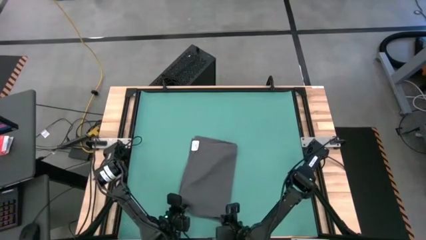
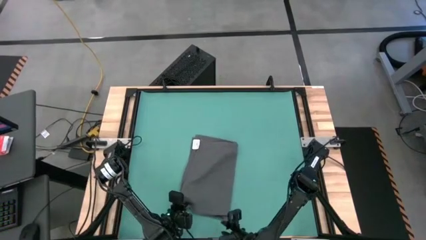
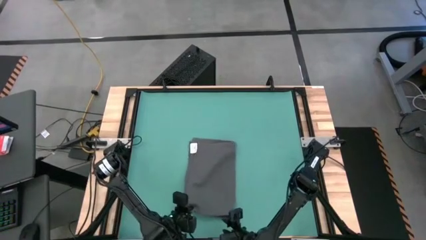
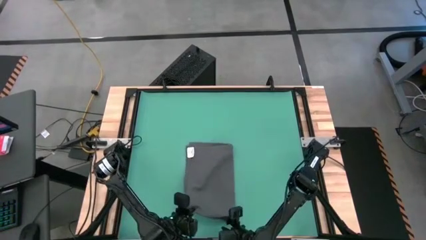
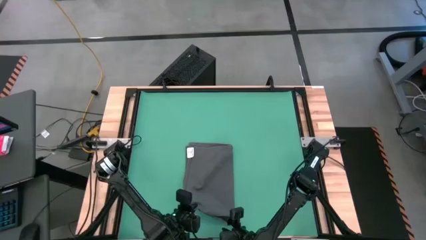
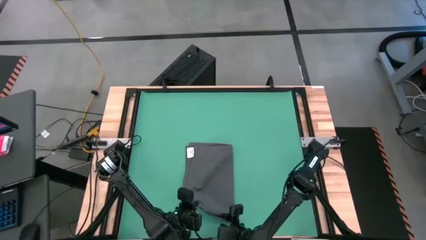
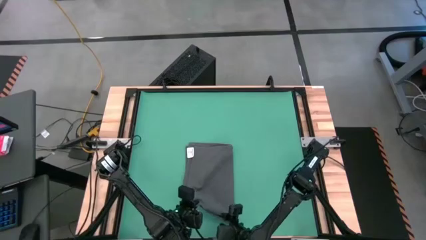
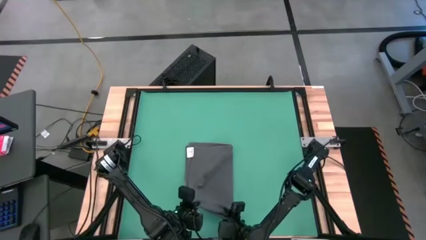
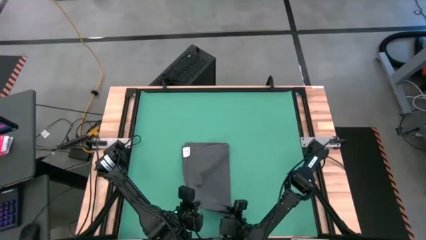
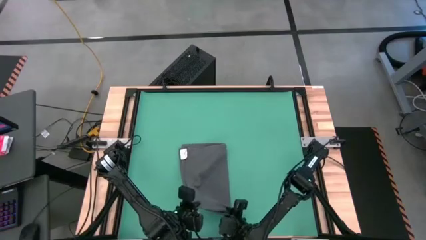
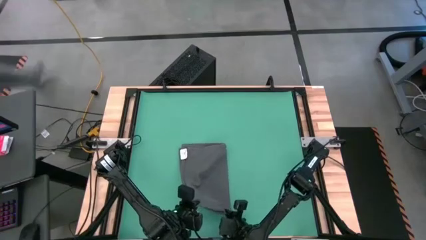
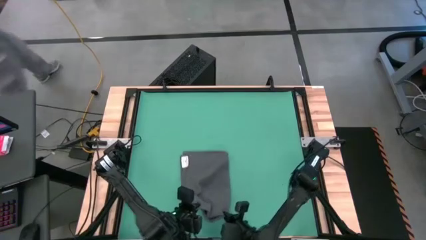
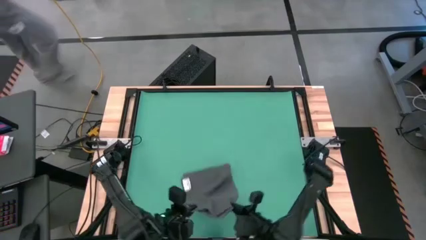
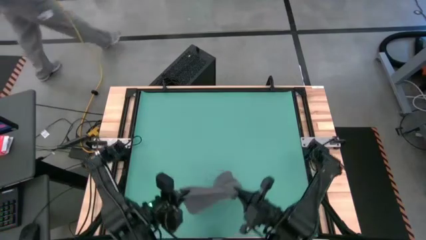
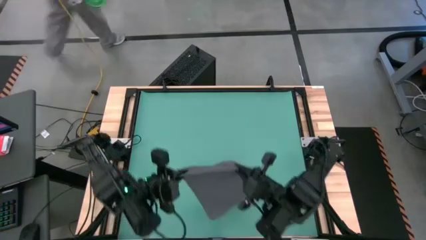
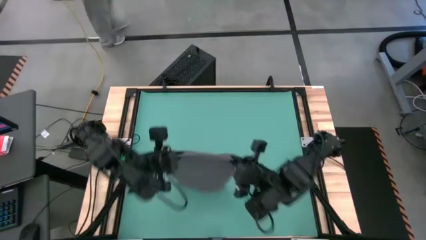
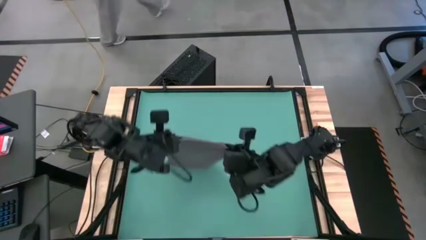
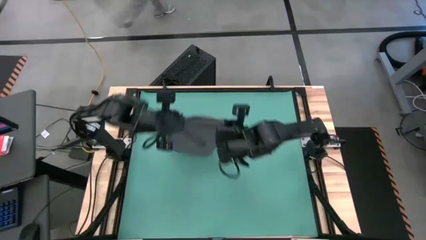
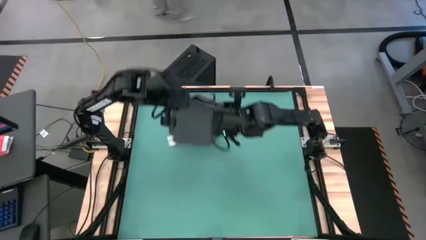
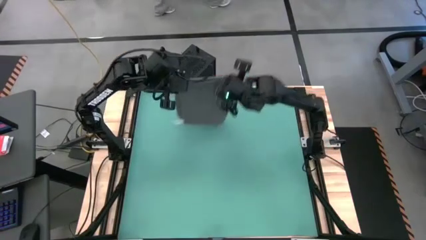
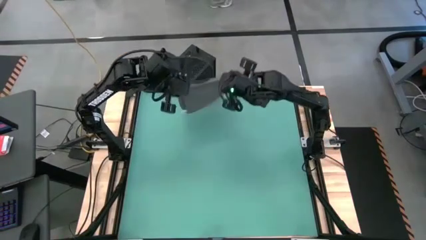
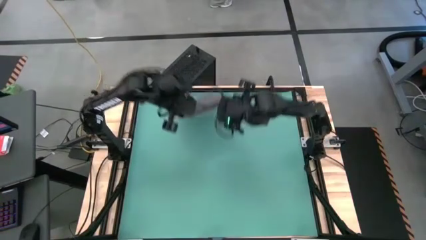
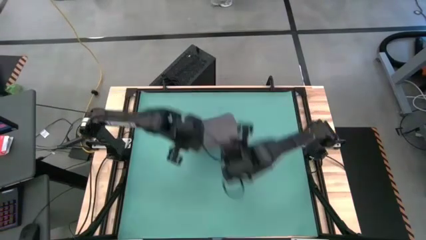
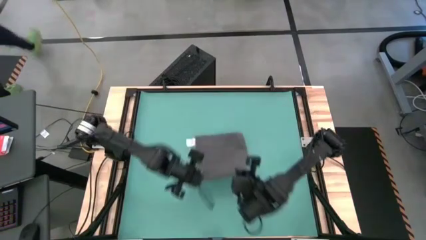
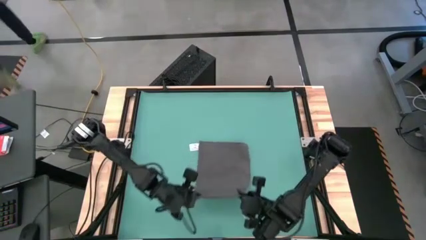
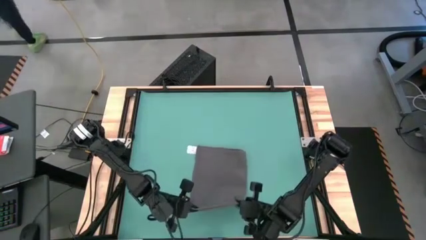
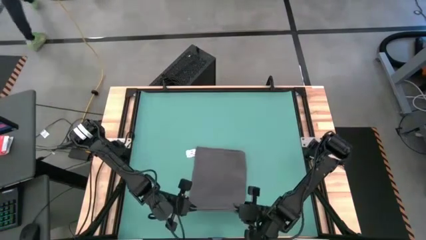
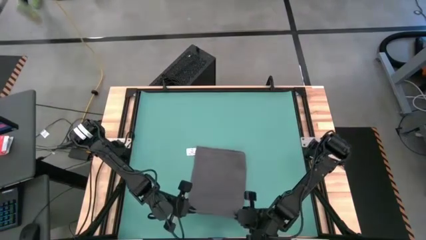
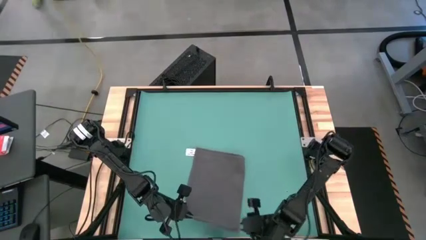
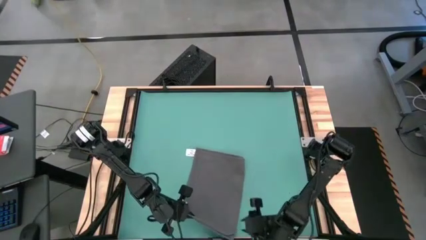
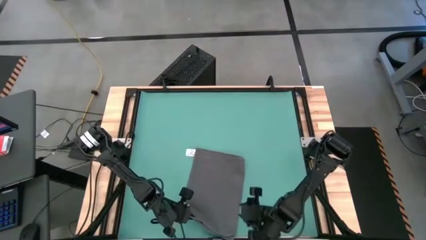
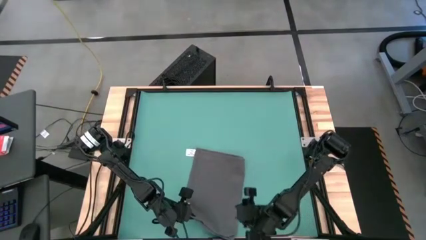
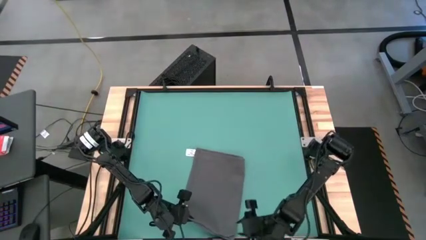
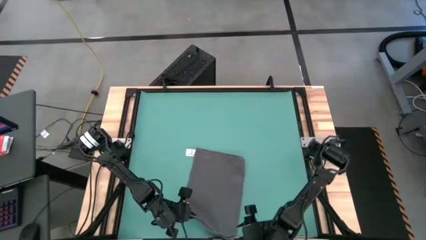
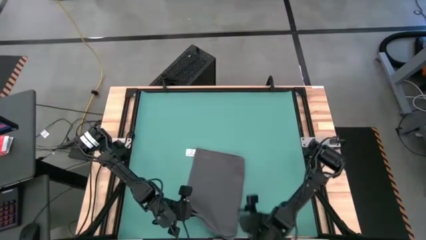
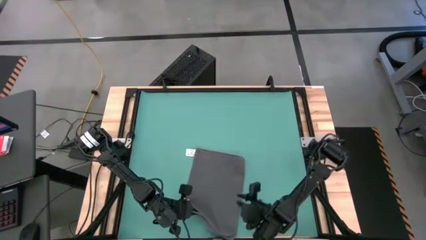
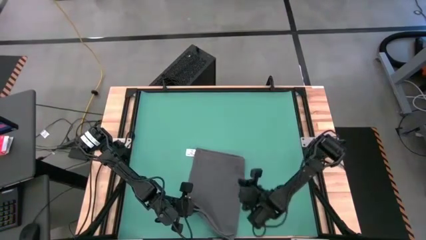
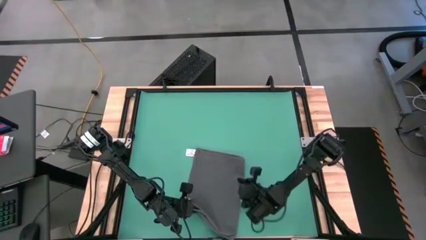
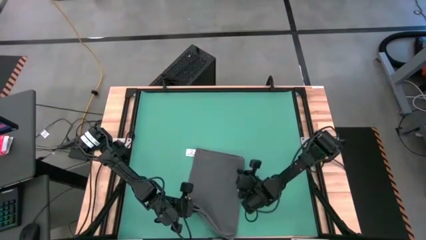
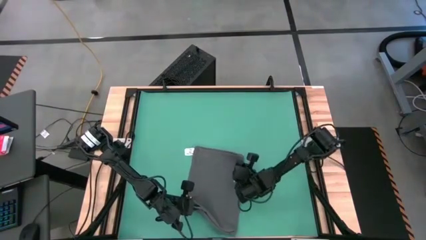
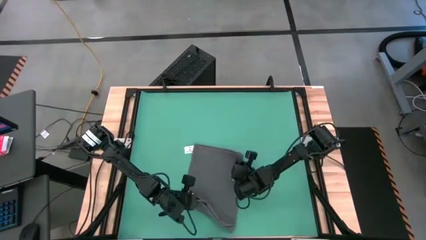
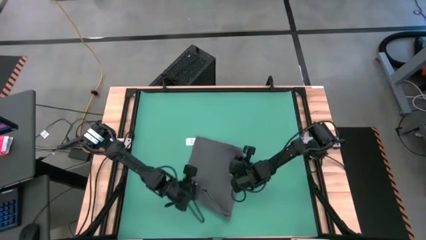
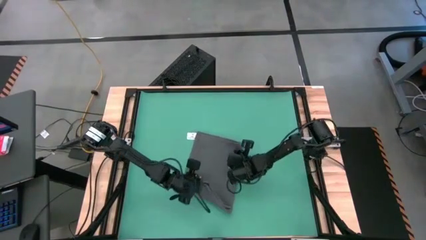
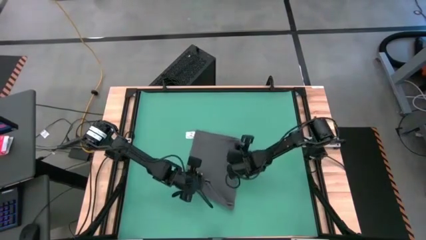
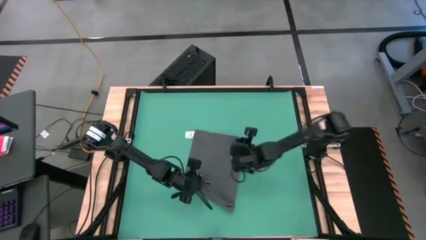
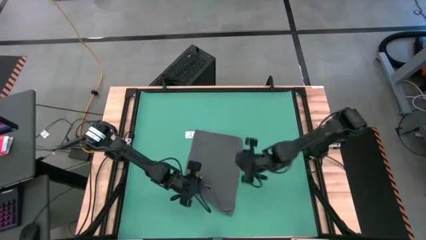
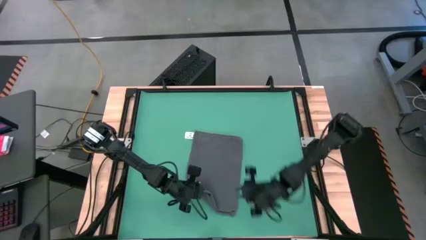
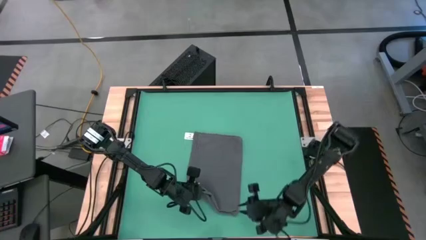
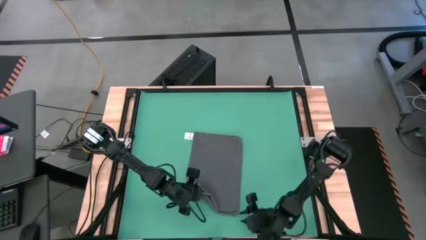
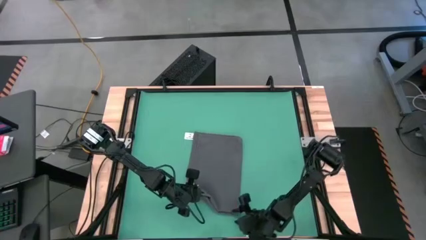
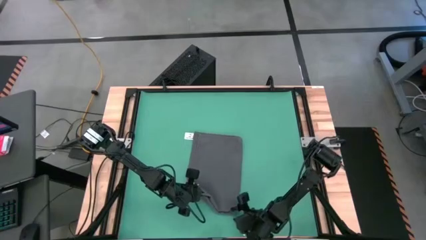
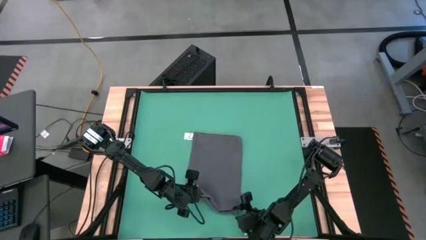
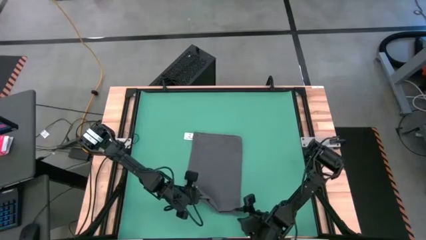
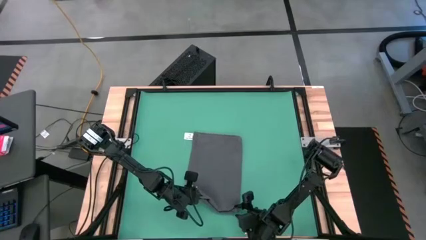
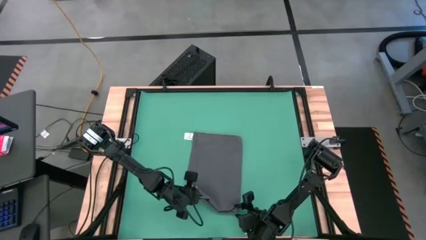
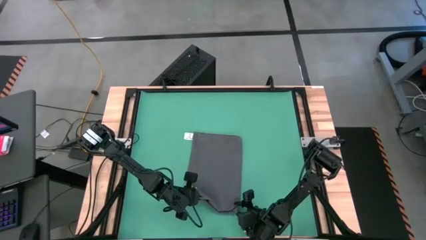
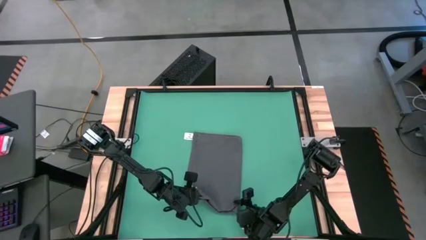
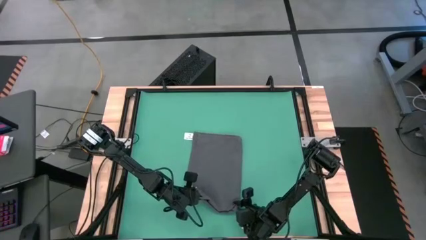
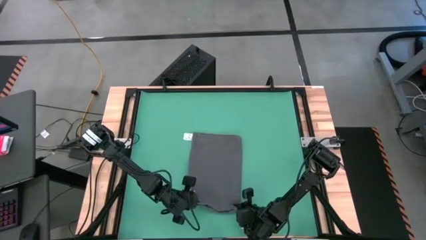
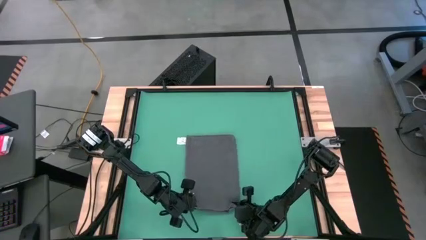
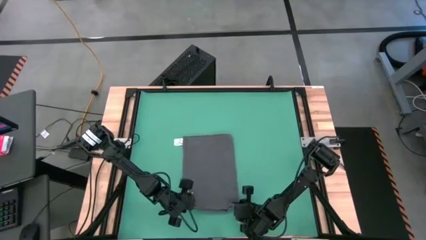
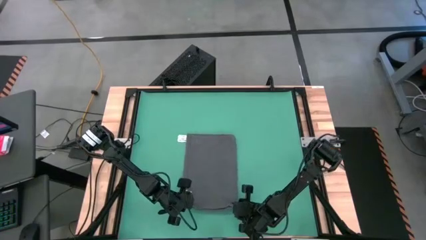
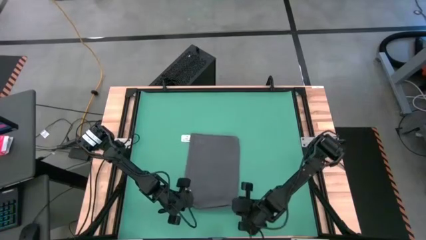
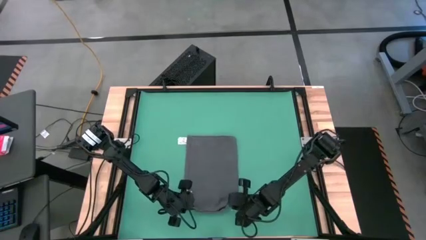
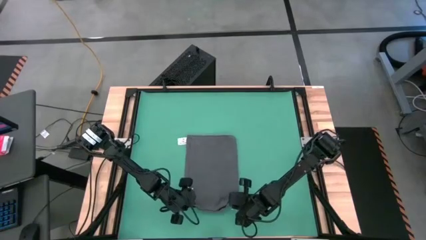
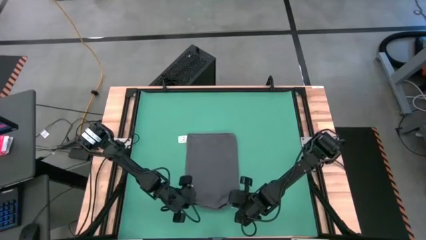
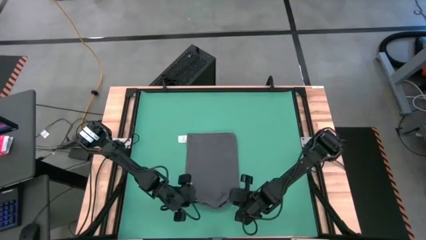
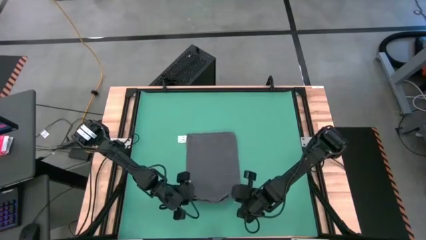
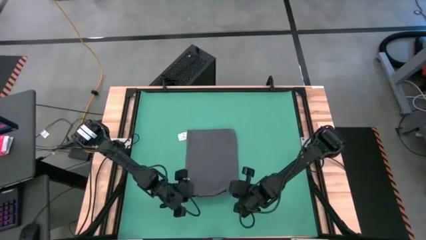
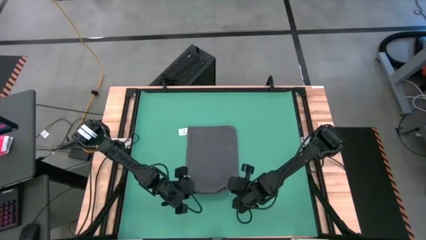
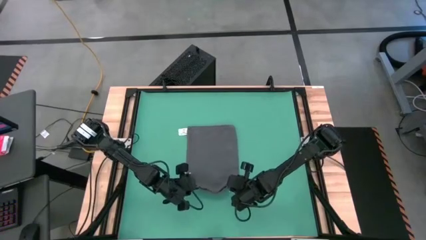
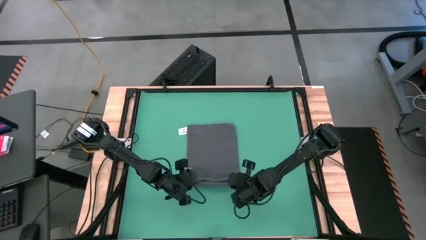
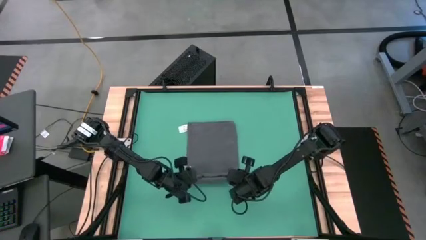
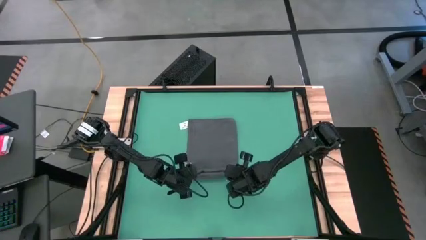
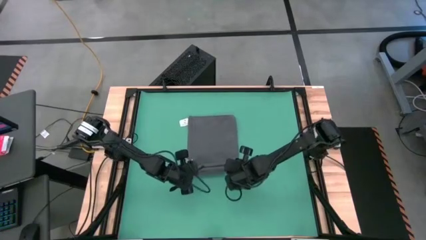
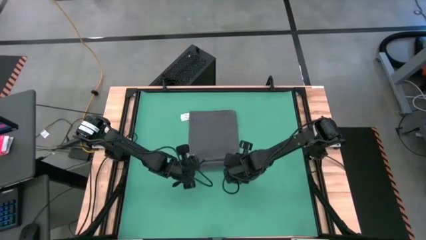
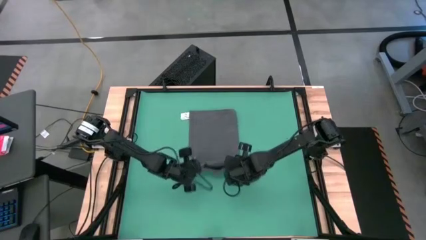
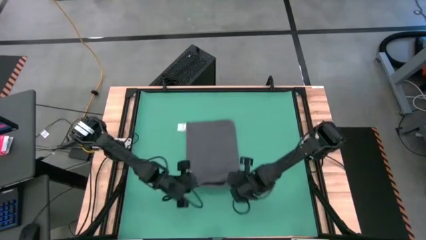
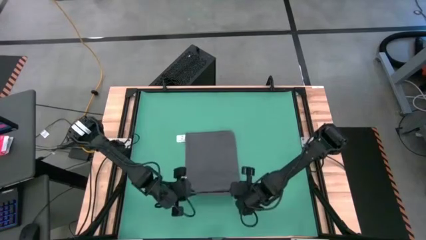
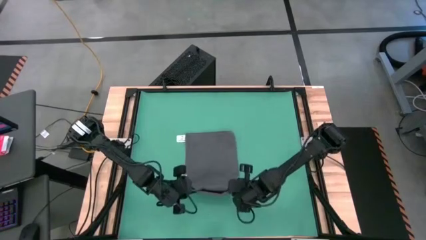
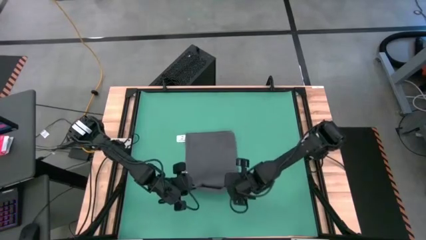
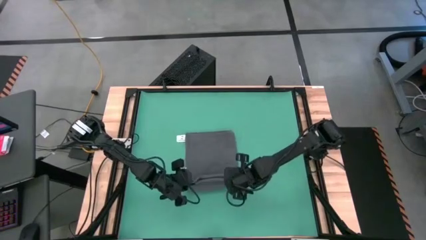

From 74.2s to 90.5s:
Task: Roll towel
Roll the gray towel
